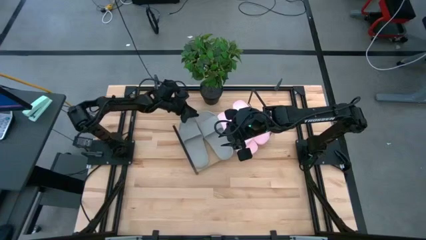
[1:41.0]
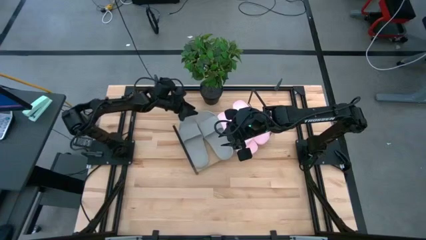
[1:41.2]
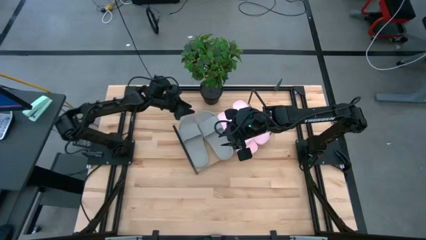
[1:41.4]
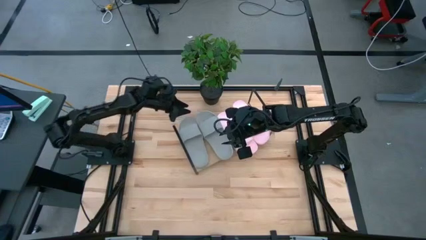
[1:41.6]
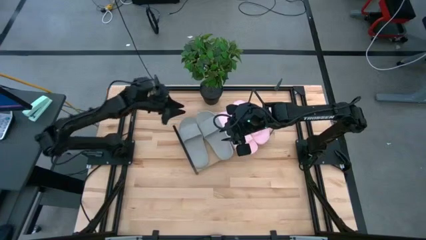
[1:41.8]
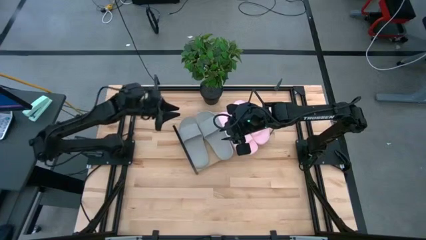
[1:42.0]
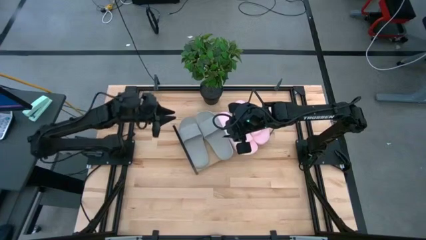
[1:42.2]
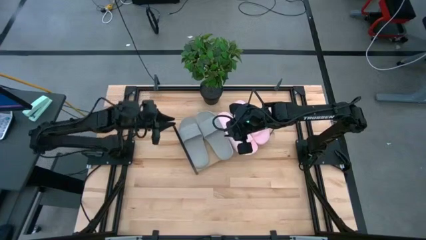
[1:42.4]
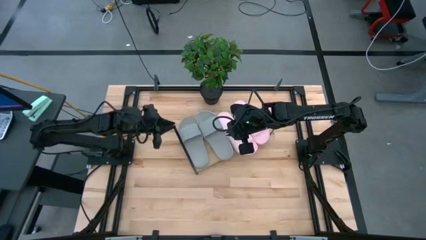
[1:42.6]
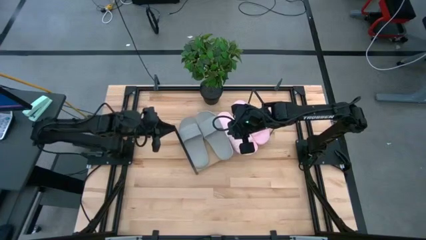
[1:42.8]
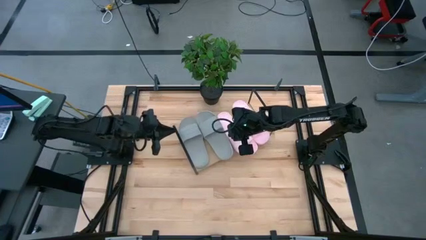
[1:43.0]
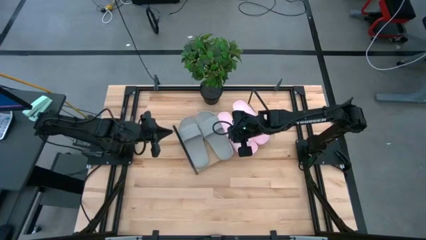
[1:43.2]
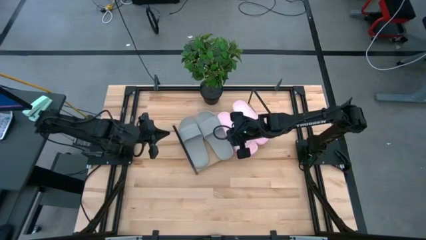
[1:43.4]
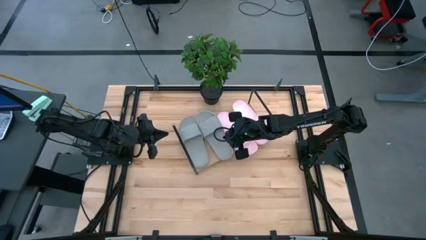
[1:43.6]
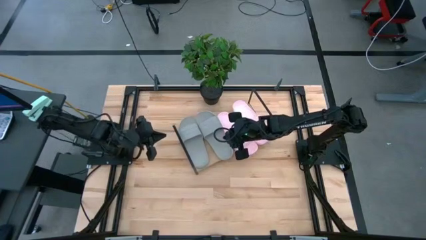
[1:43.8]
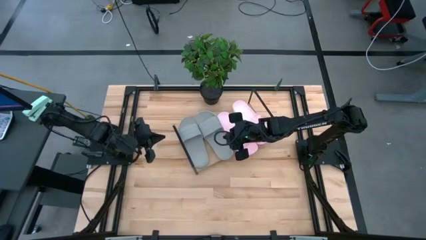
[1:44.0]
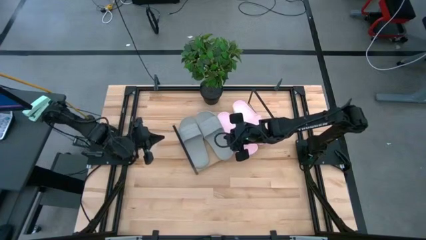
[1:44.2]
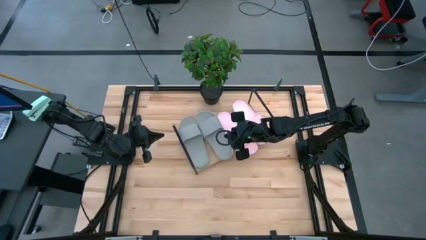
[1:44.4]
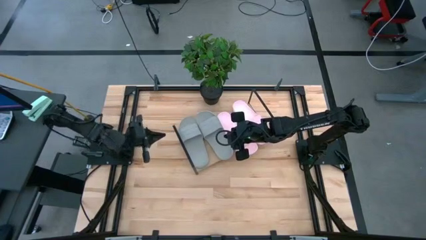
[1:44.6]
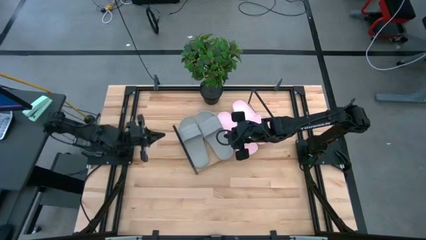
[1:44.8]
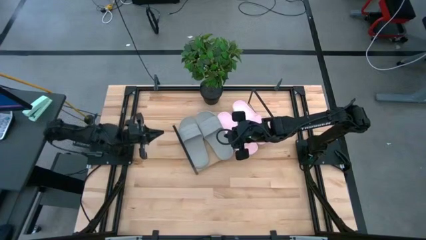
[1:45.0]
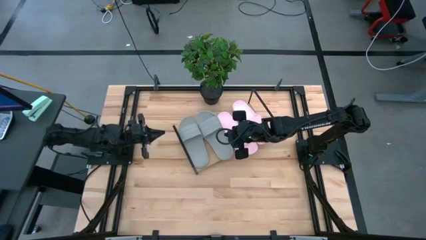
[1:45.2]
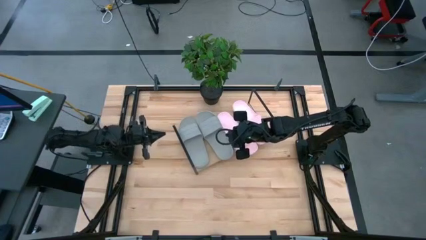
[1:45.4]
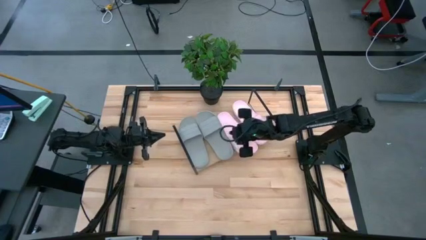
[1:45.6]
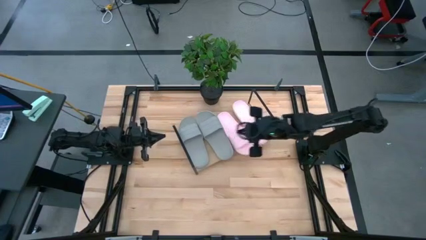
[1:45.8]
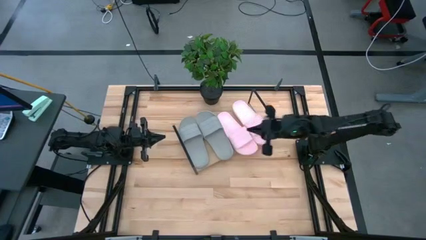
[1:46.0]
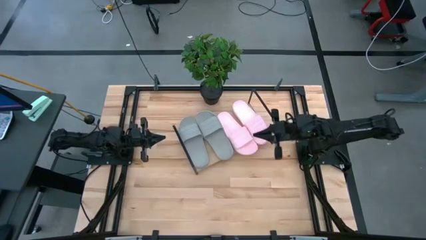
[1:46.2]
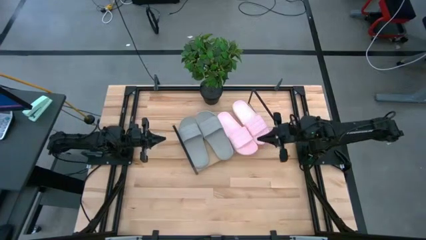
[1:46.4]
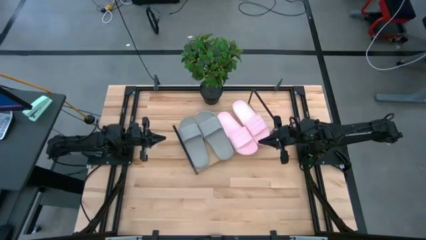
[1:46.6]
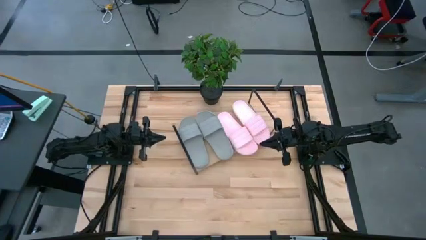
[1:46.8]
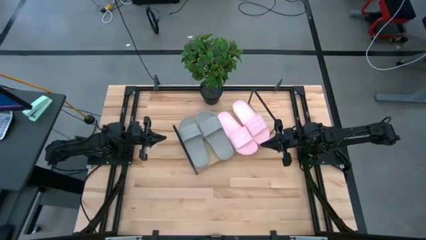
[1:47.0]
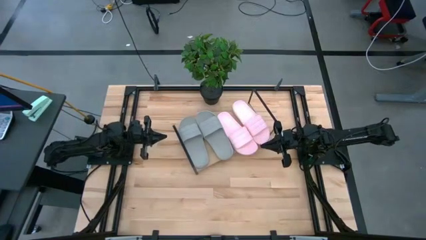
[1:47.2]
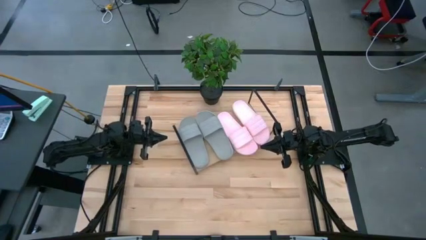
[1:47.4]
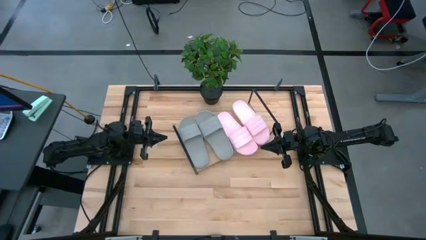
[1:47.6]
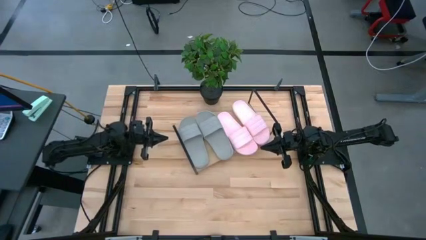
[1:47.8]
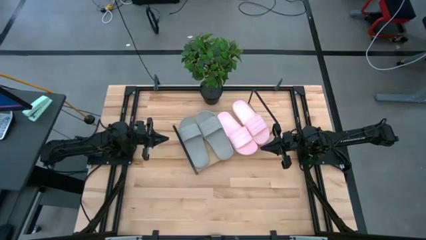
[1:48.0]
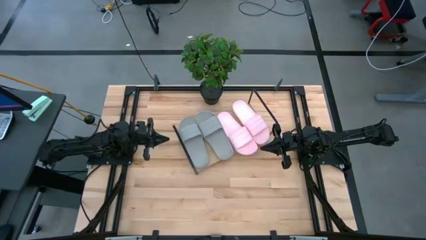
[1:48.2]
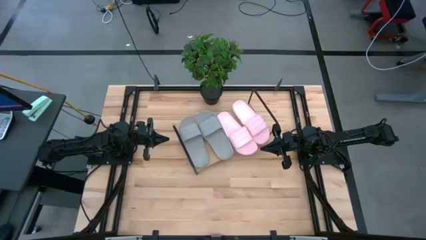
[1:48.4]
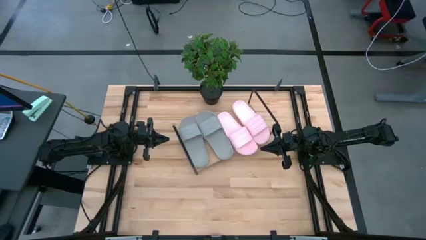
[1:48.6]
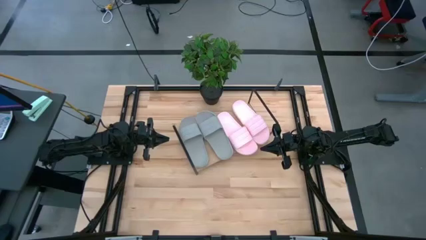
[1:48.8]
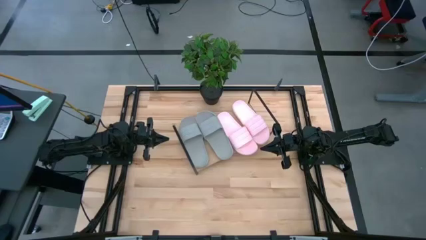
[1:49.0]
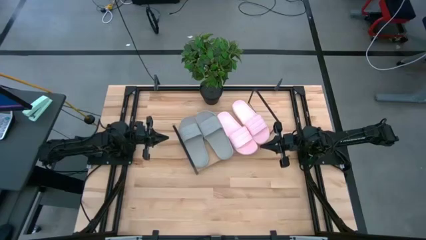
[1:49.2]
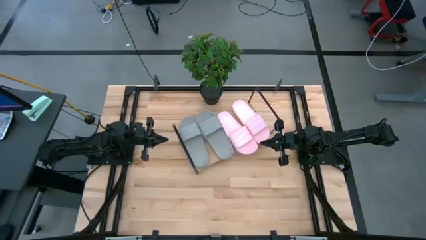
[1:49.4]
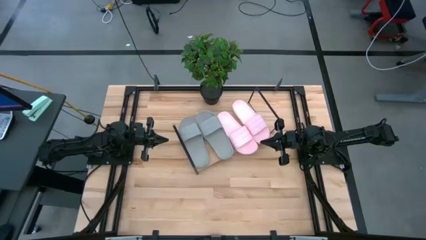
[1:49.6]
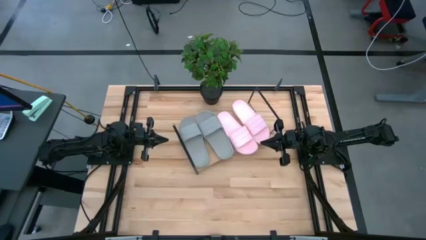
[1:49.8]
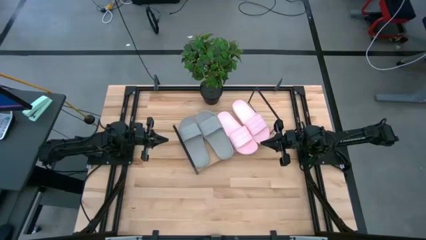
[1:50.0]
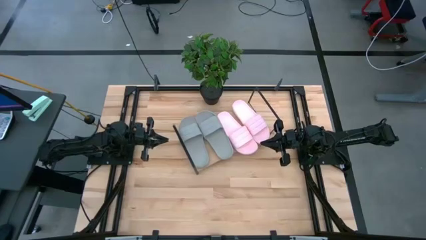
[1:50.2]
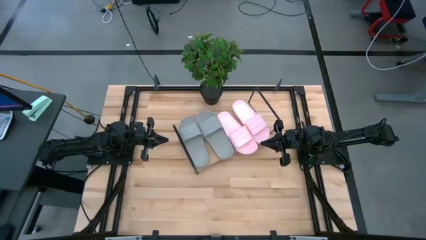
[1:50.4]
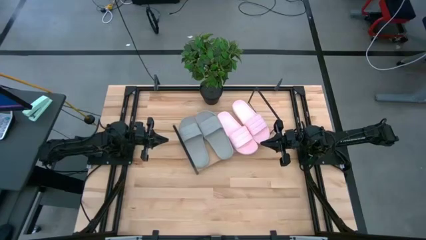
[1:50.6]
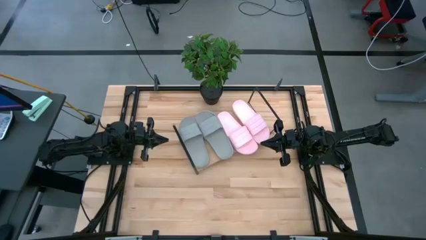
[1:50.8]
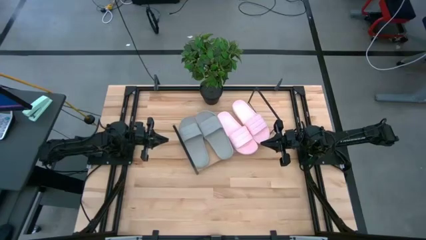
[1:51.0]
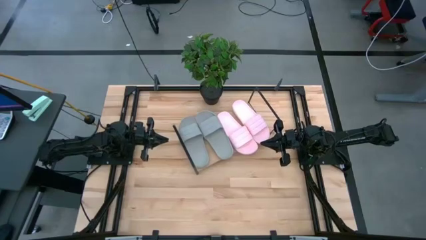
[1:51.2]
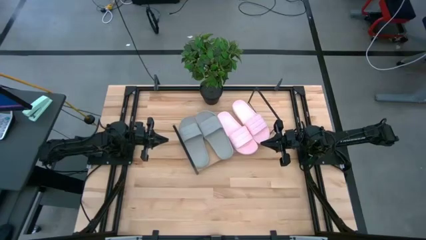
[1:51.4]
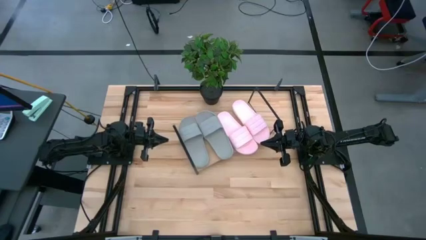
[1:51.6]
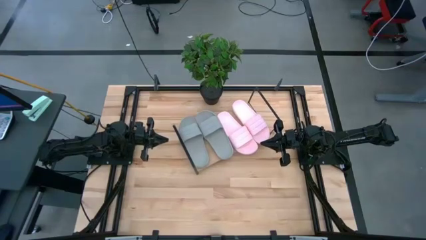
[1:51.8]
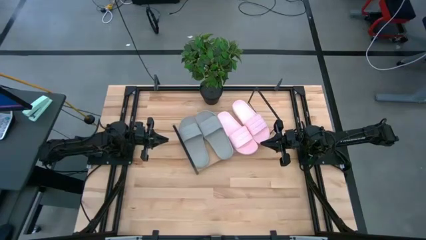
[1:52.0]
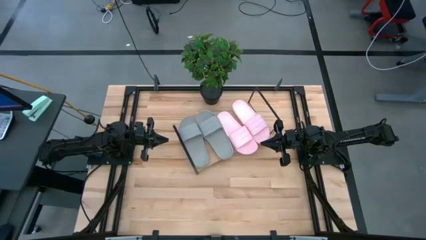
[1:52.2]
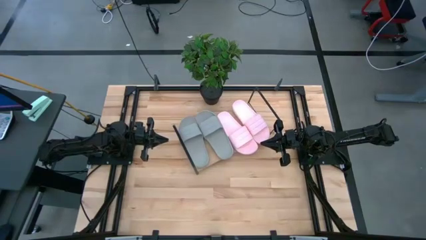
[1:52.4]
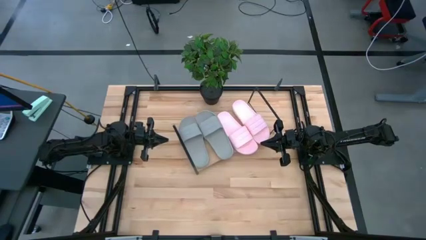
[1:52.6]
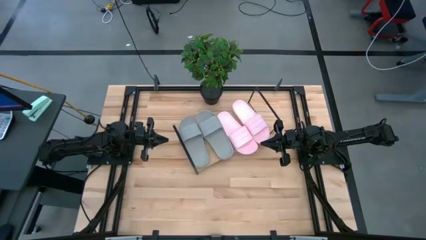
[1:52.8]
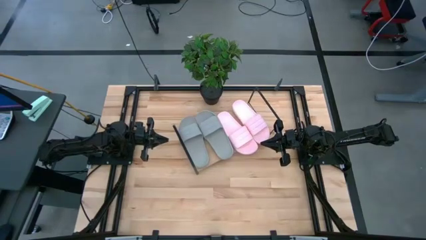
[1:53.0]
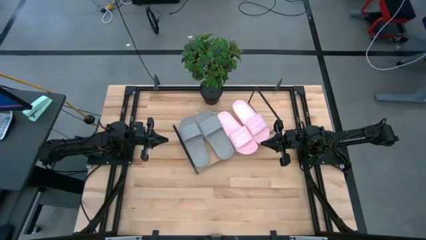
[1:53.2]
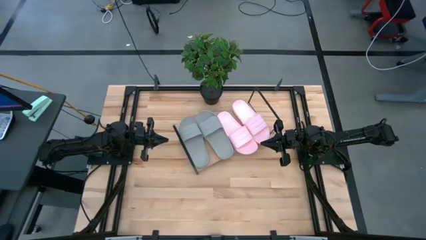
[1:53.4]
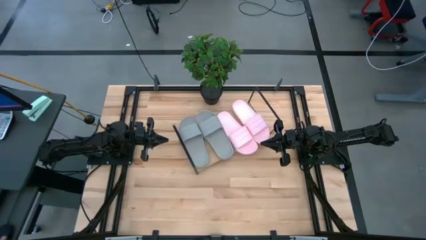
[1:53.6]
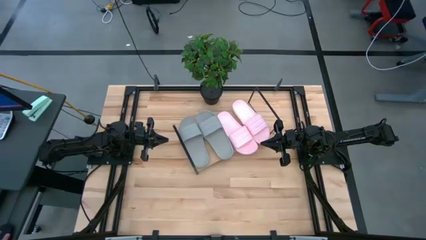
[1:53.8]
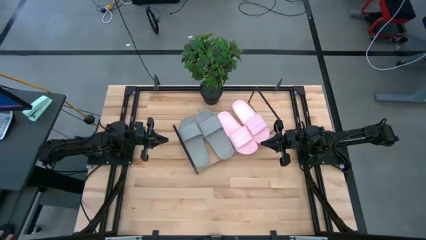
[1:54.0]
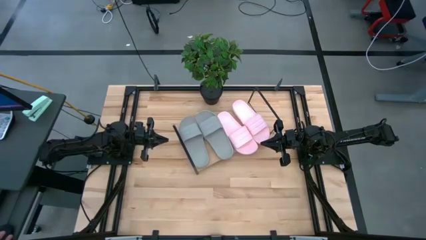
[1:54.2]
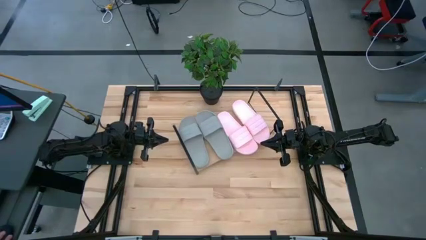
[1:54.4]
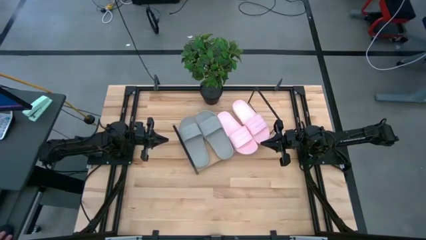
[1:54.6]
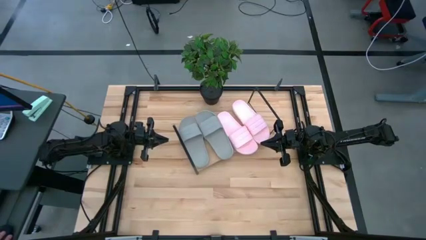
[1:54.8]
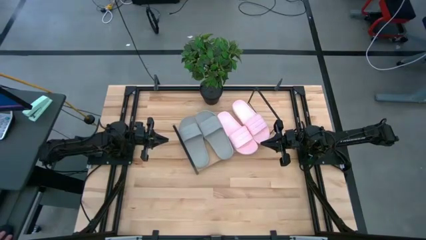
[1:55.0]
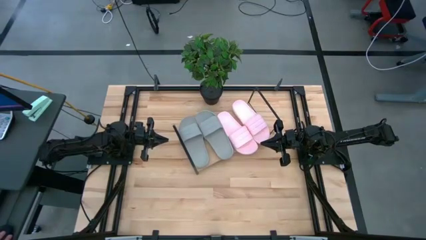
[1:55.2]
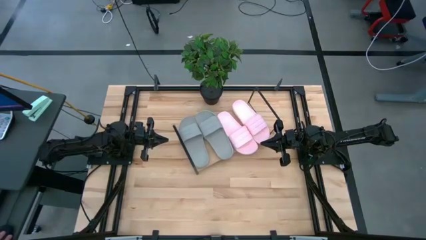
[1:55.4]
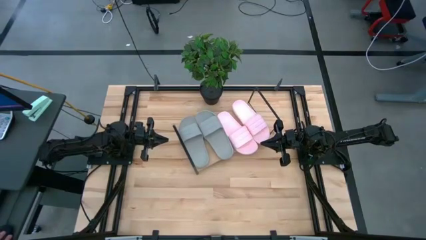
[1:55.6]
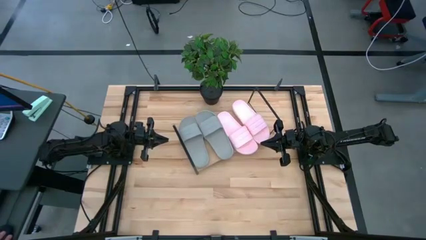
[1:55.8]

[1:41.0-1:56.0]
Task: Pick and place slides into the shelf
Return to Home Position
